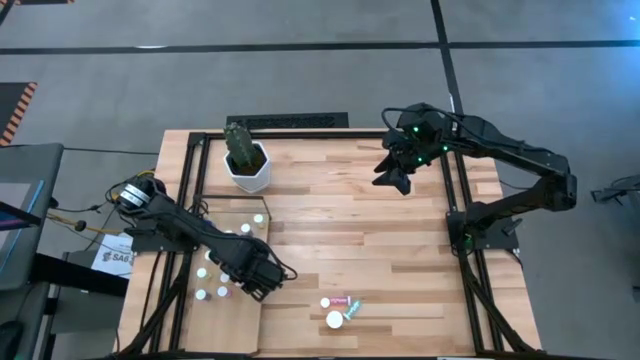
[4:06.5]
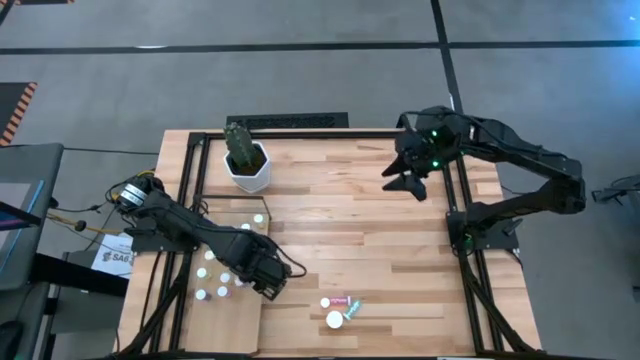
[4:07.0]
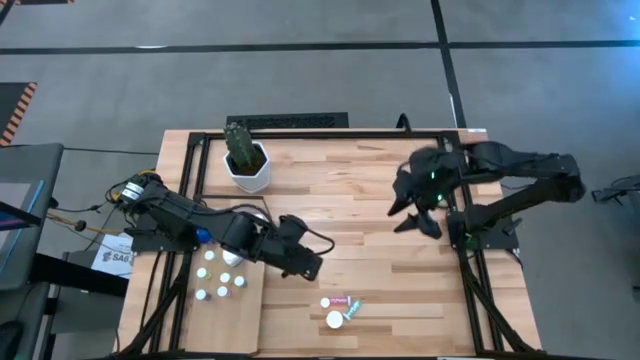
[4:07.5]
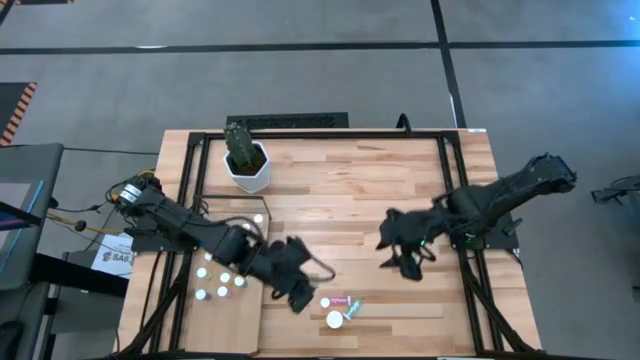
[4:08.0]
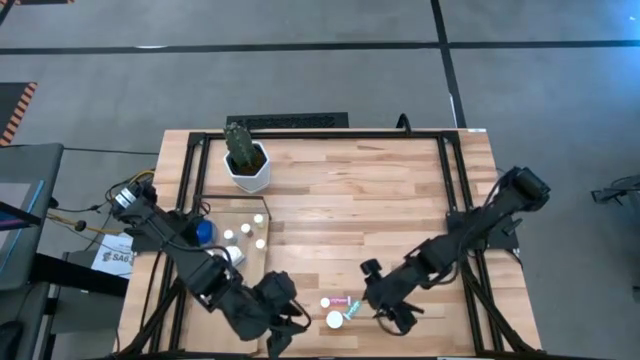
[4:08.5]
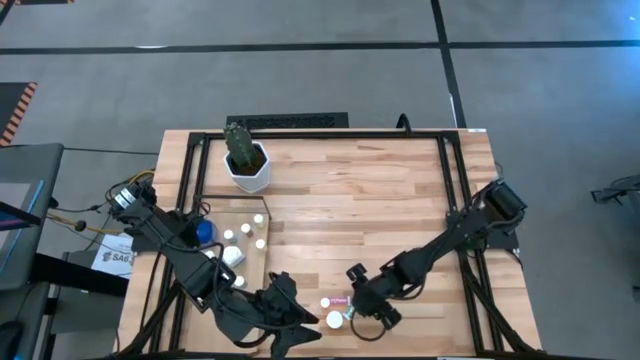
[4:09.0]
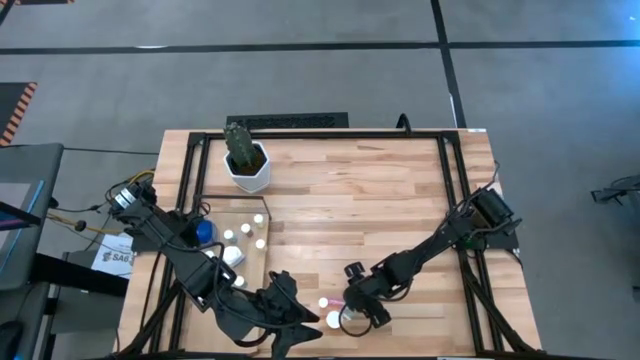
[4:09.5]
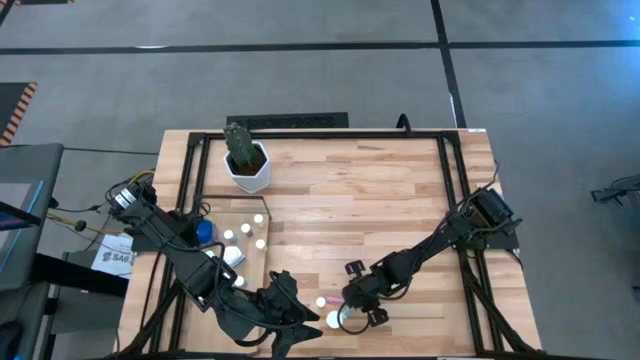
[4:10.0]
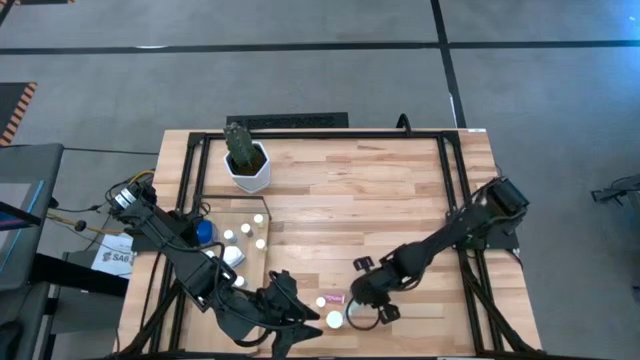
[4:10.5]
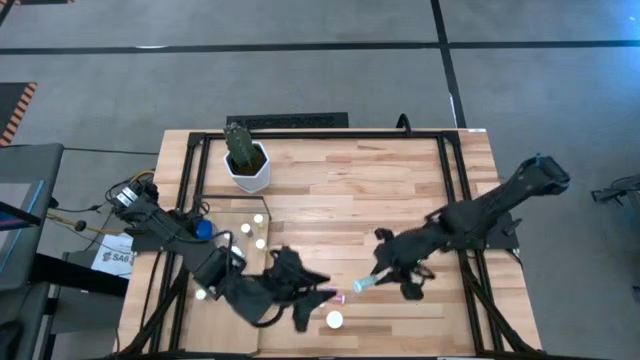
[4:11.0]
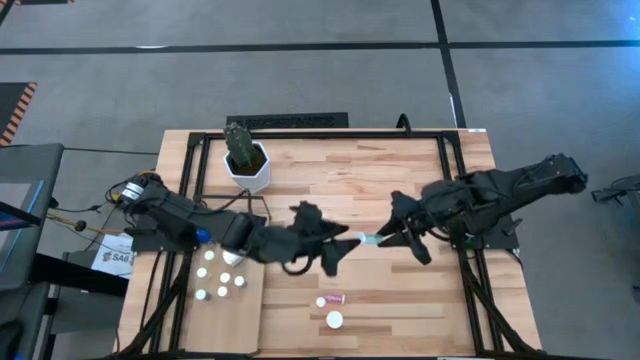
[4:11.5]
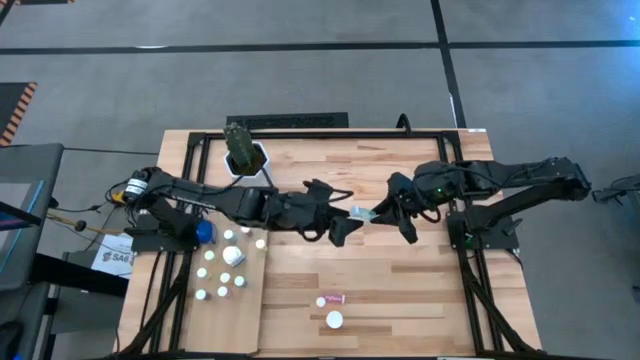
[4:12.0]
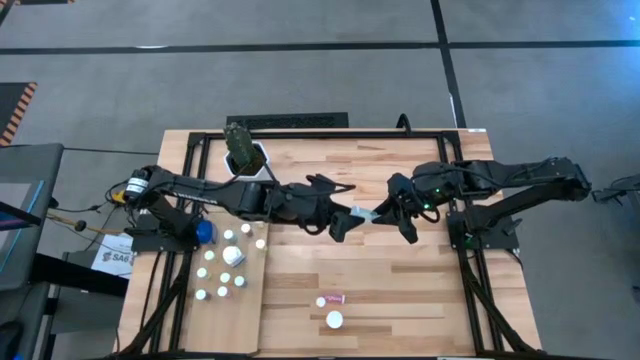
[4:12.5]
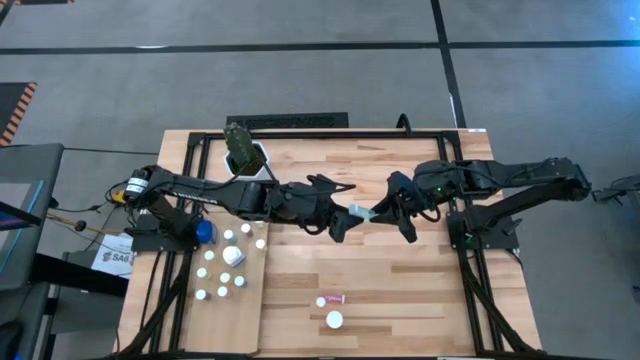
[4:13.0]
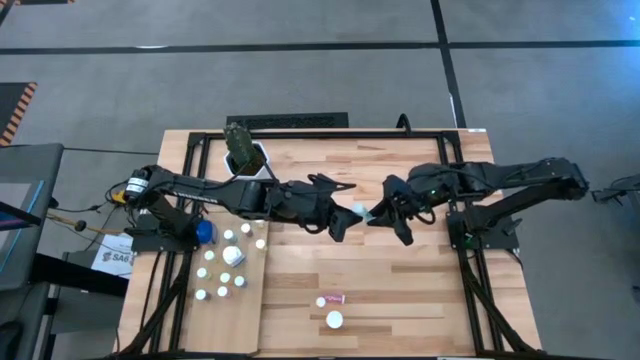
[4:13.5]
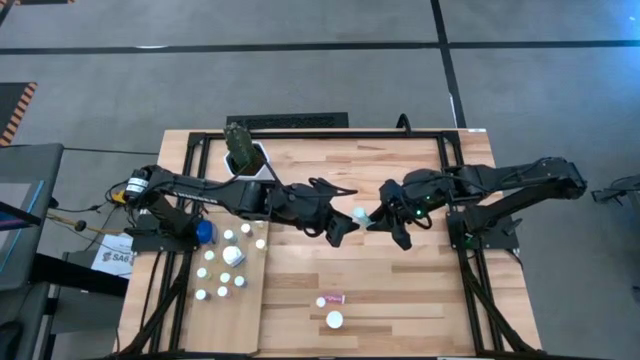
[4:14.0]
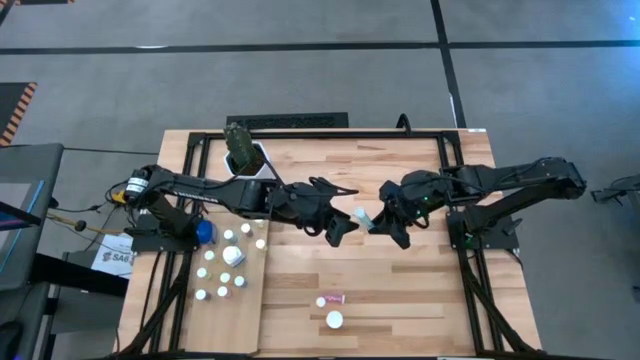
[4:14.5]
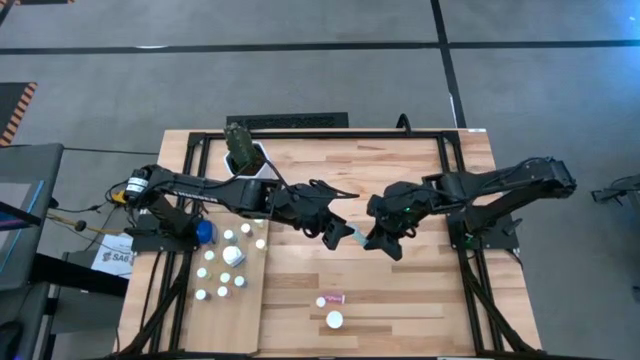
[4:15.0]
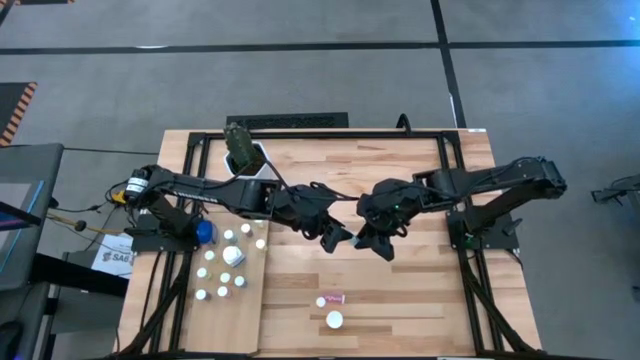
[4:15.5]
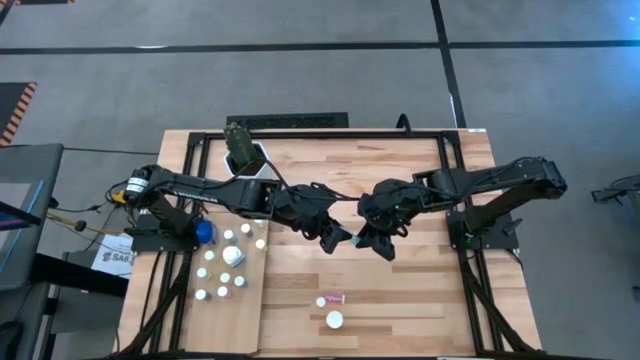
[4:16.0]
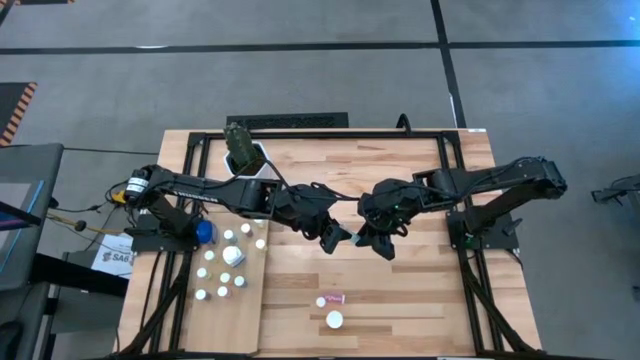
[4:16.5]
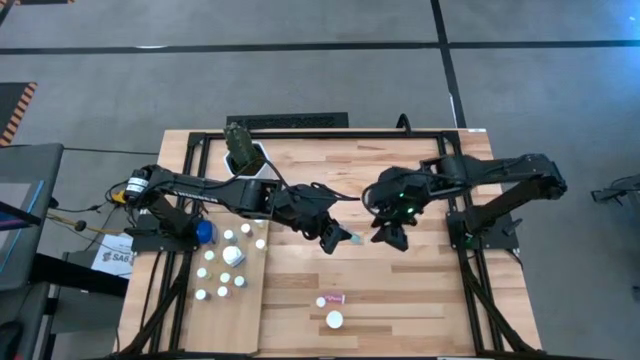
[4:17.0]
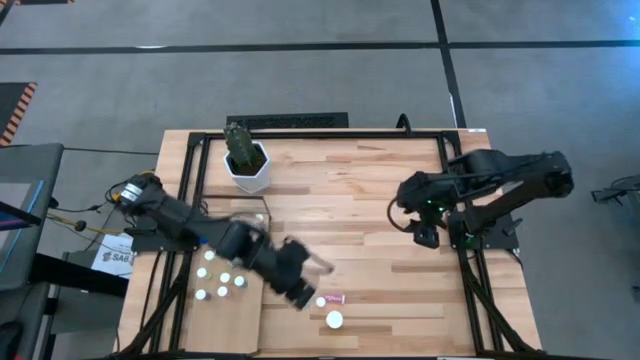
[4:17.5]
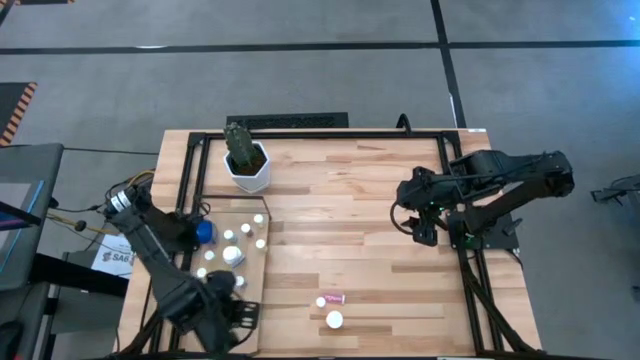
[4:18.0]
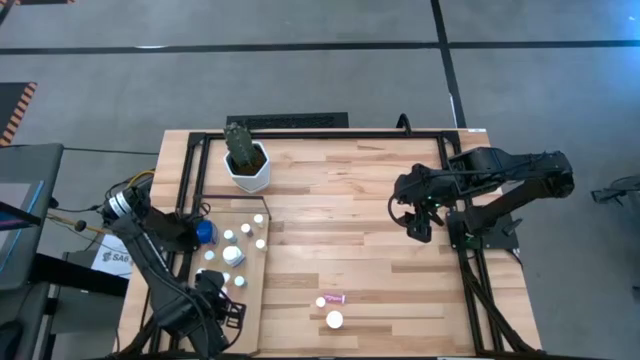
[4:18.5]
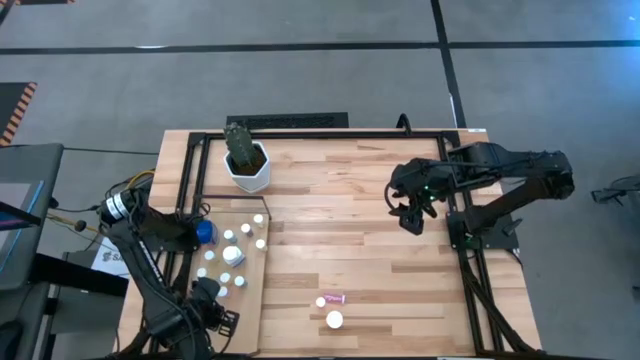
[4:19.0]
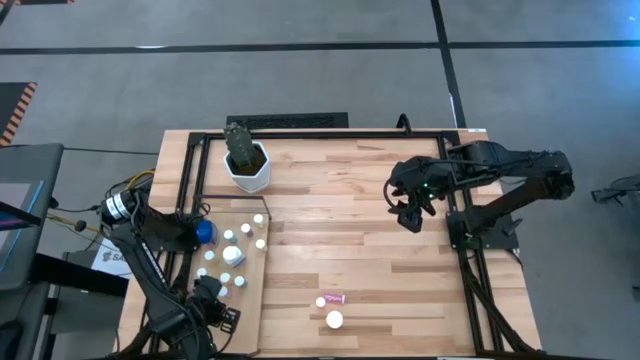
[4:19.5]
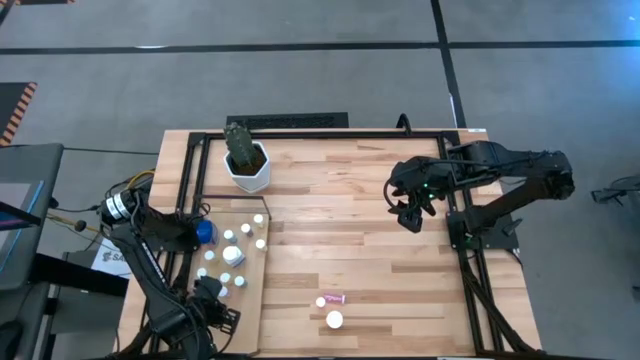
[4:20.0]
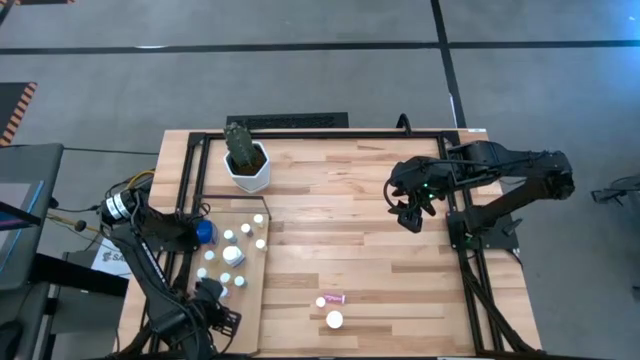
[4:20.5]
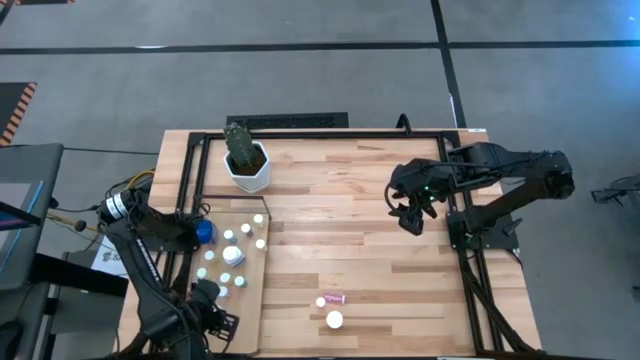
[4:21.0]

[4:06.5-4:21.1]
Task: Pick and place medicine bottles onto shelf by color
Put the light blue pill bottle on the shelf
